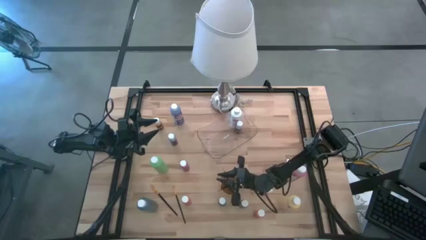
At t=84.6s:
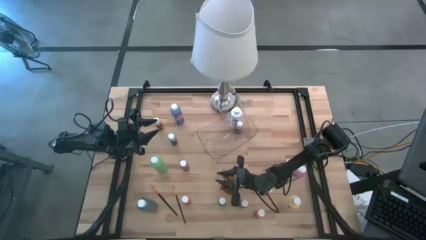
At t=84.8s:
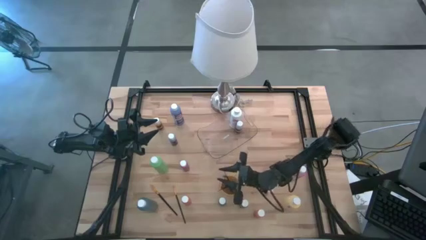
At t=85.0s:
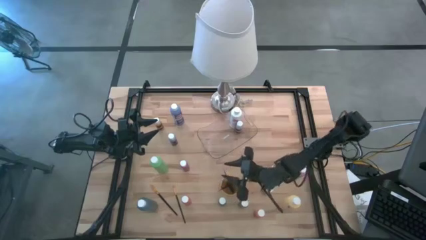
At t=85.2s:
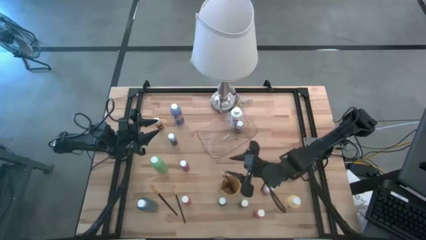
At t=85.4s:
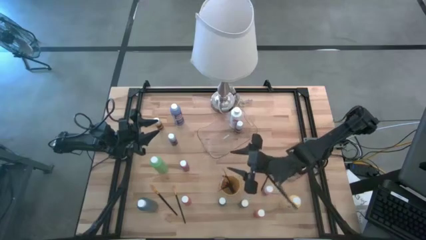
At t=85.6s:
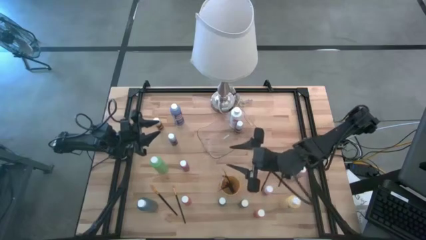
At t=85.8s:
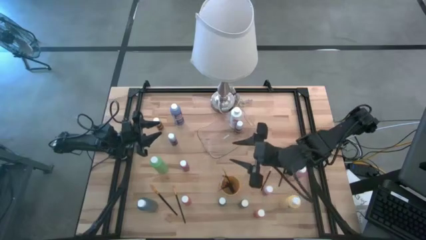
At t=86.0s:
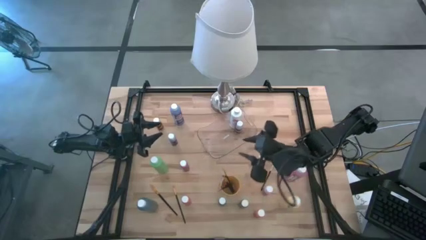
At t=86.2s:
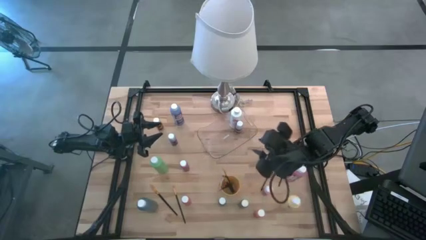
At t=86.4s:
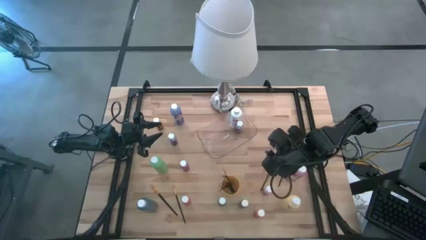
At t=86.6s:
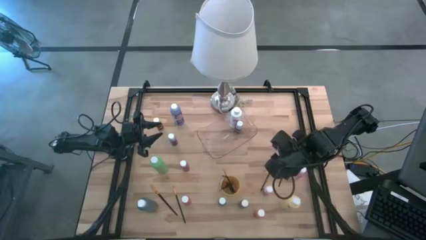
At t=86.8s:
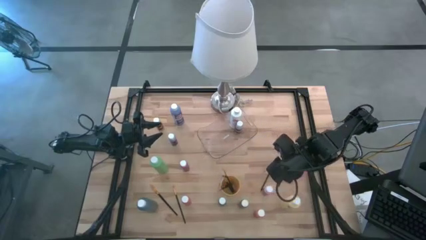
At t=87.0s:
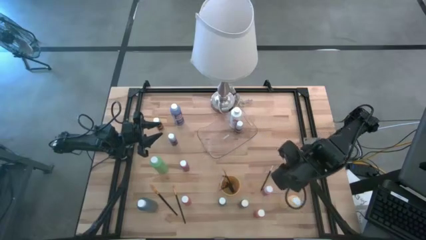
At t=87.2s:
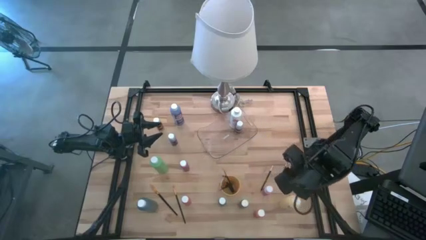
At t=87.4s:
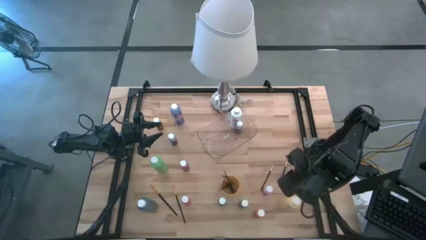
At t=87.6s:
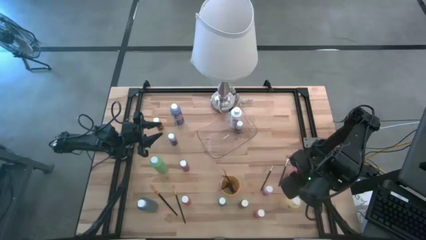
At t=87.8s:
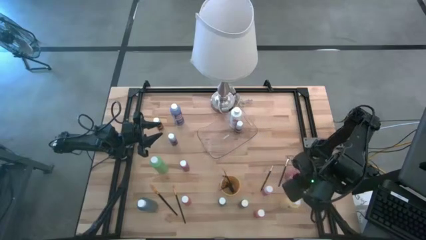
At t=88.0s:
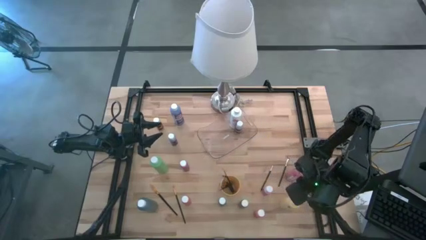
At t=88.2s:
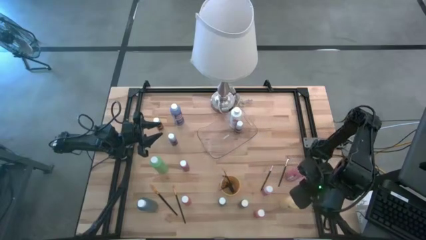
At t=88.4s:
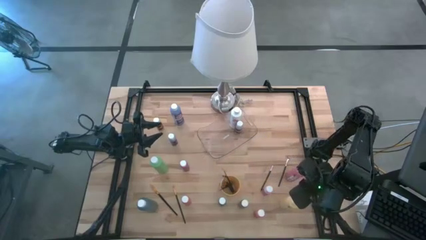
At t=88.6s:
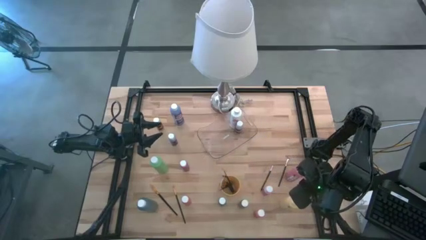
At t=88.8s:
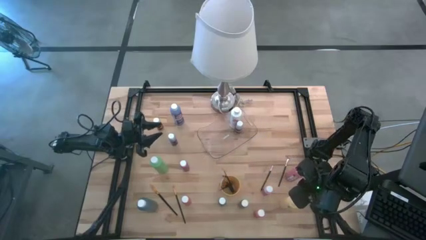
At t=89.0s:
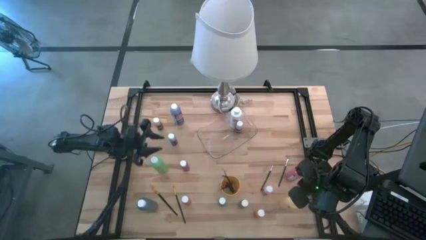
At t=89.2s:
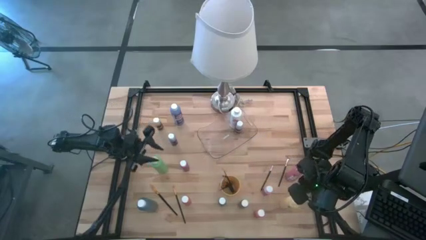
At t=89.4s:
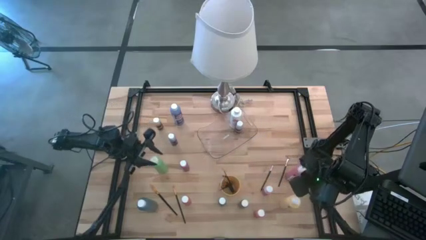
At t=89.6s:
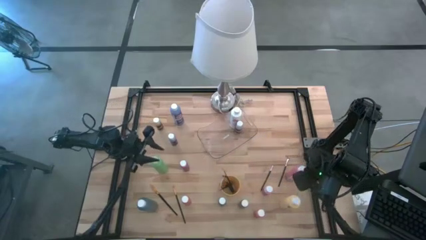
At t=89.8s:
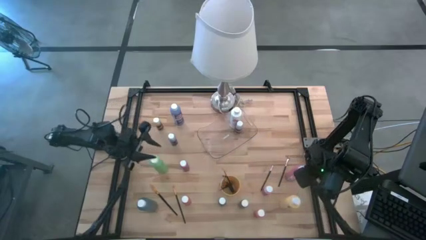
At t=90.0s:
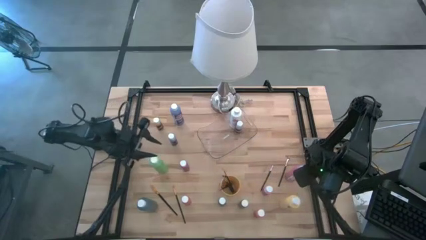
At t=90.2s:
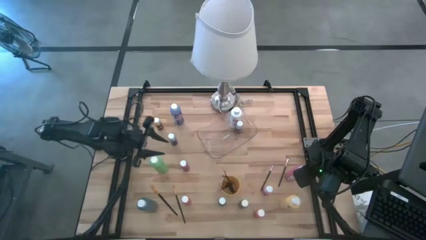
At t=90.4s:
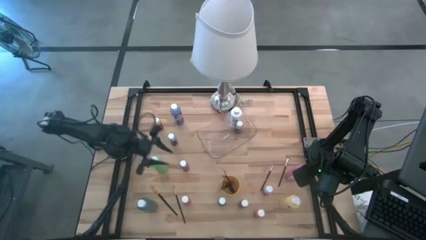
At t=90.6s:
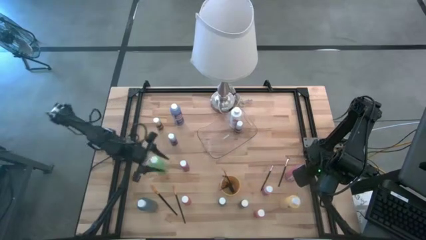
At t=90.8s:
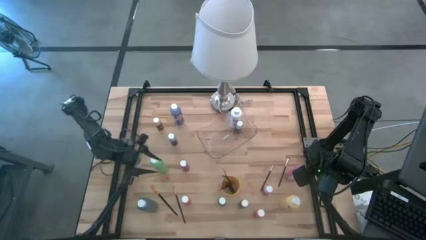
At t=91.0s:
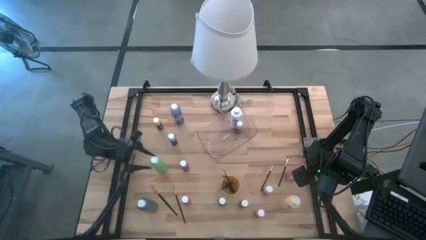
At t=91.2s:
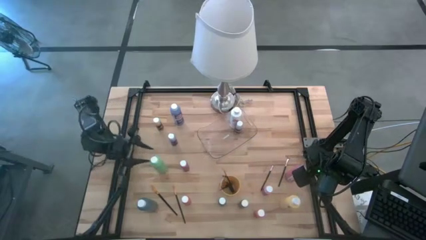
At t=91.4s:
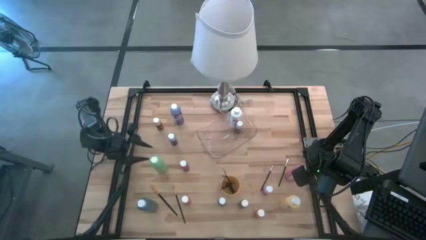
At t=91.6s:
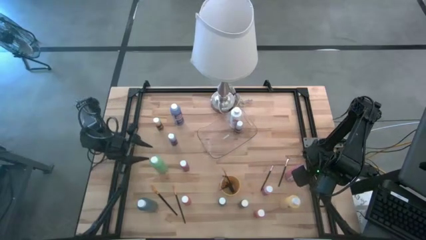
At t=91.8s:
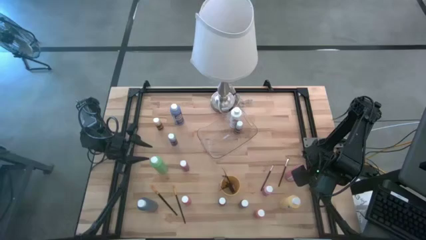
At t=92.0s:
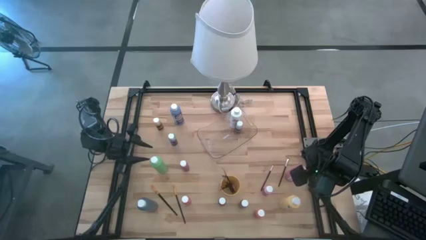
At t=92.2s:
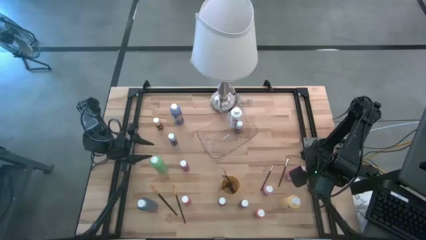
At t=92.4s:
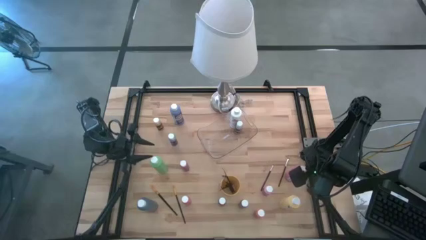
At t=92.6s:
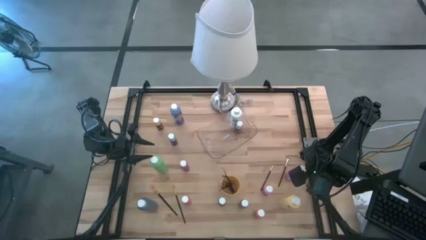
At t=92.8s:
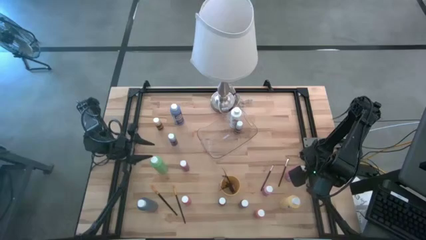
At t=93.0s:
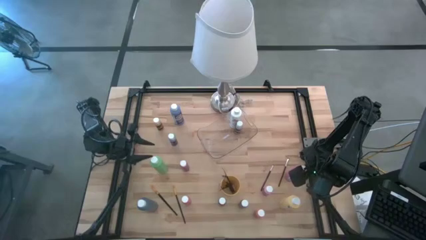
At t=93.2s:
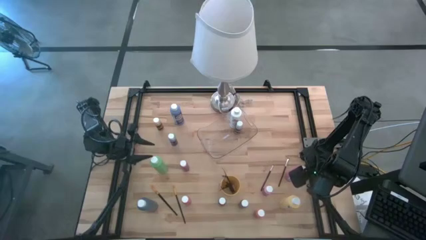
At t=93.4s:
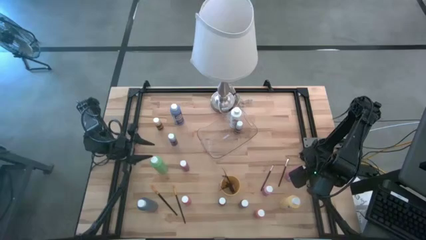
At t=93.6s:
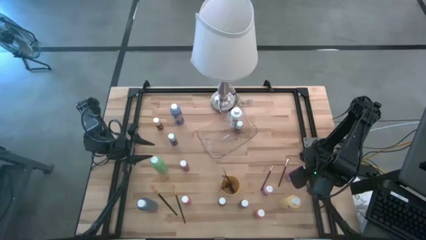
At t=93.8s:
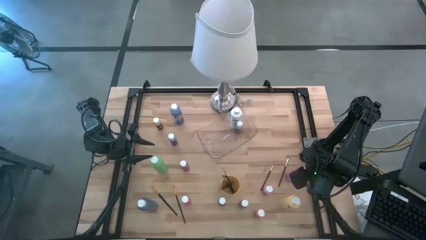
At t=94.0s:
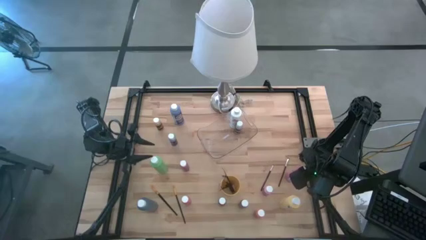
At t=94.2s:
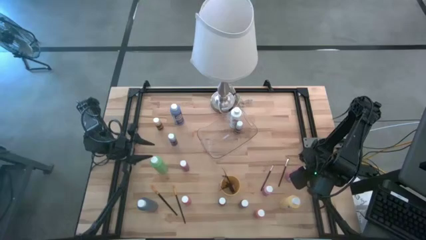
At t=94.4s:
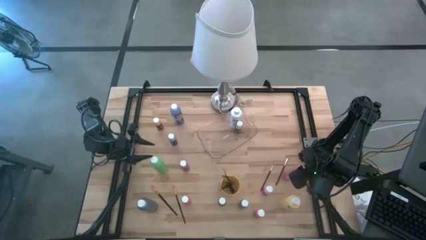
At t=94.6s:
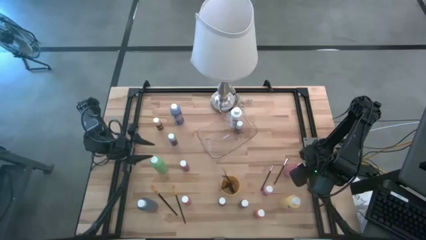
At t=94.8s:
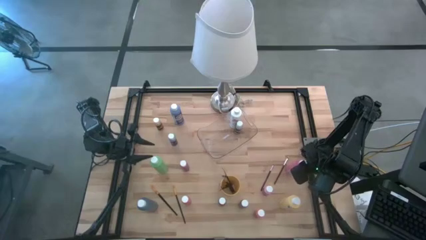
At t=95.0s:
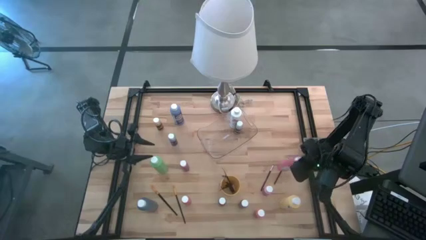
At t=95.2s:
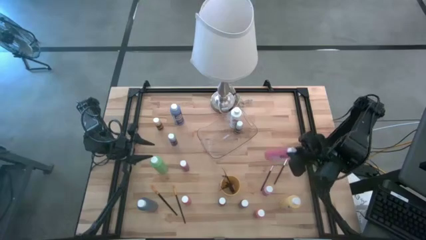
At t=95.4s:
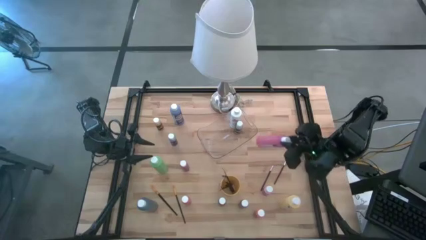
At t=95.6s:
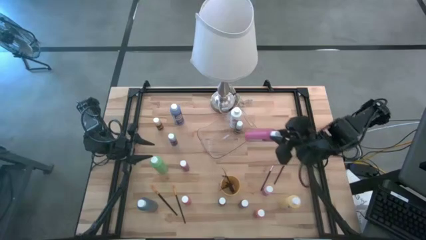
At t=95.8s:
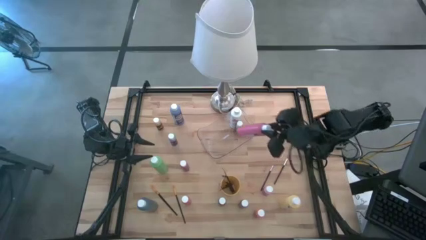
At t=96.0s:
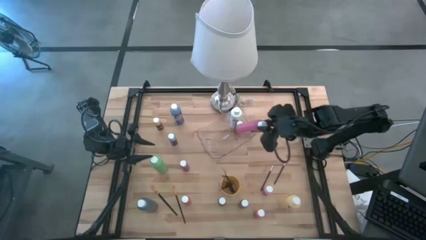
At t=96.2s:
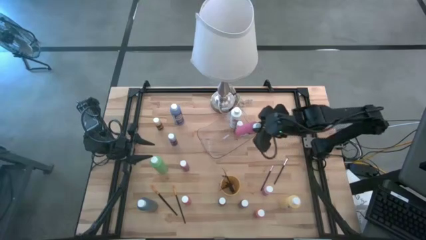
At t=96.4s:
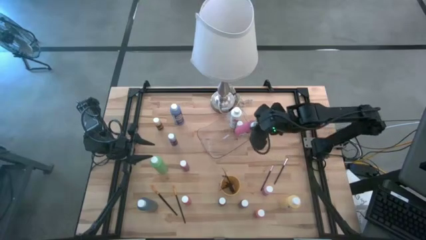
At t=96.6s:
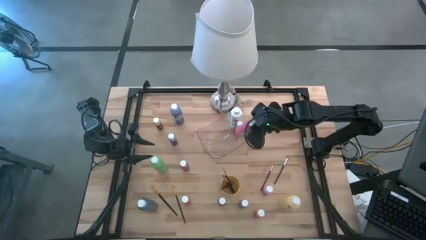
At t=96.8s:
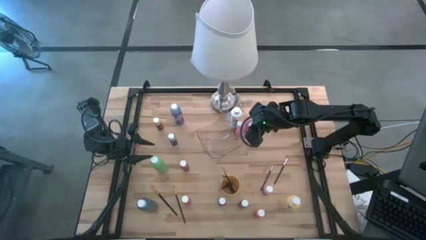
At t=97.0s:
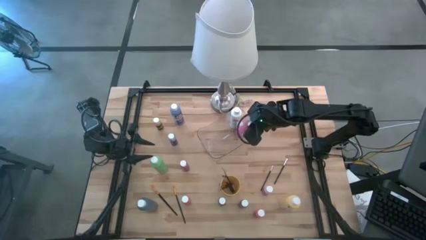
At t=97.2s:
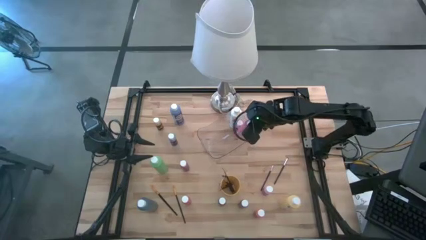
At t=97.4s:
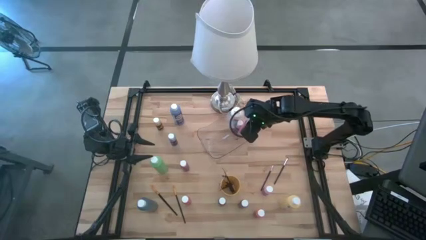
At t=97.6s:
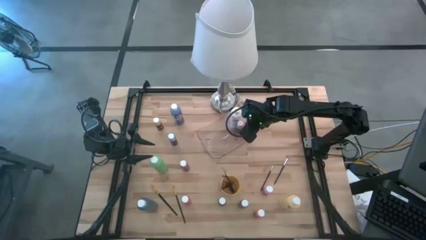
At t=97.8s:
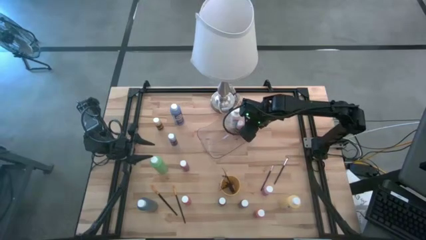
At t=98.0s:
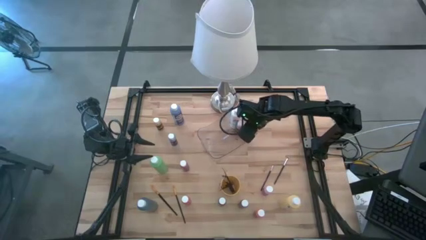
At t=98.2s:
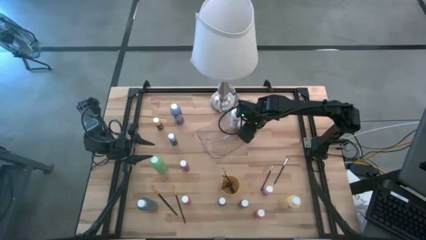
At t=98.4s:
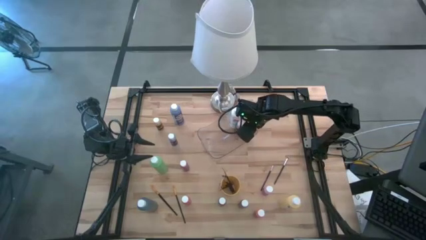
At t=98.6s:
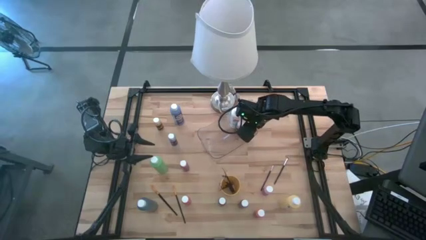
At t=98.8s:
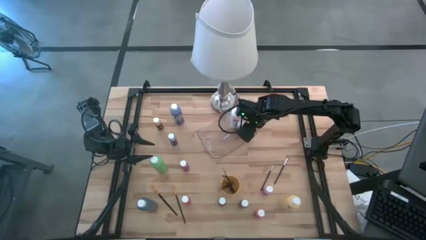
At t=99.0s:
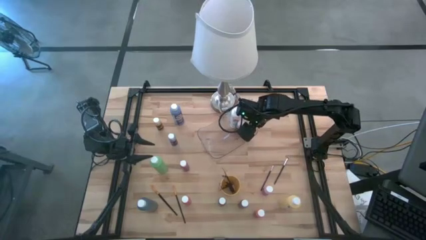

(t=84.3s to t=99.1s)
Task: Pick & Place Paint Supplies
Put the red paint bottle into the transparent bin
